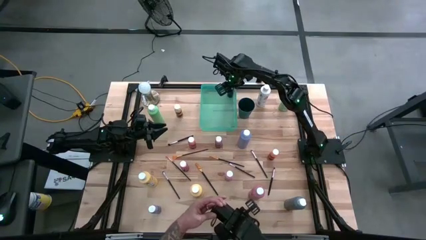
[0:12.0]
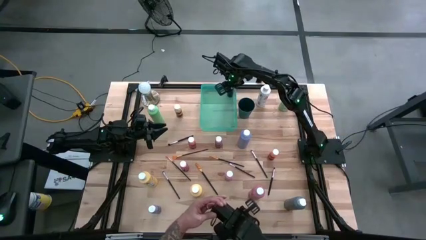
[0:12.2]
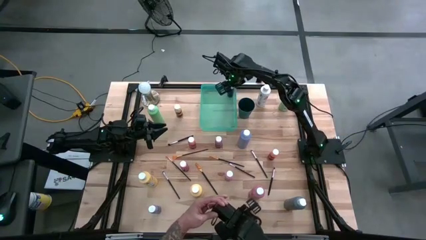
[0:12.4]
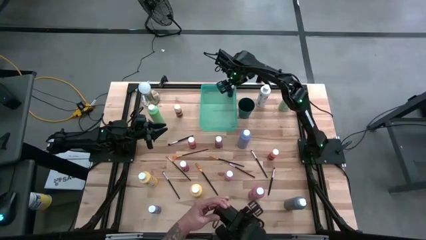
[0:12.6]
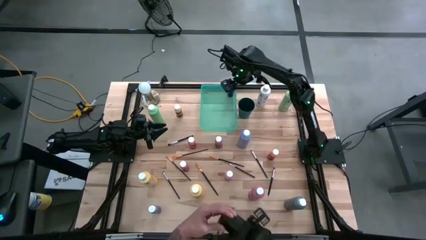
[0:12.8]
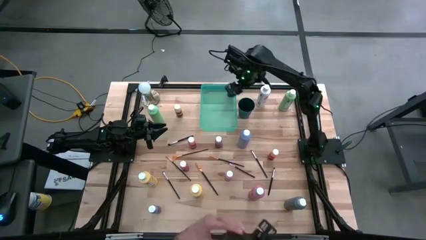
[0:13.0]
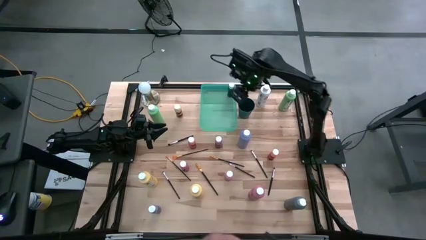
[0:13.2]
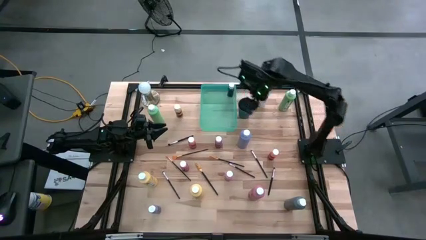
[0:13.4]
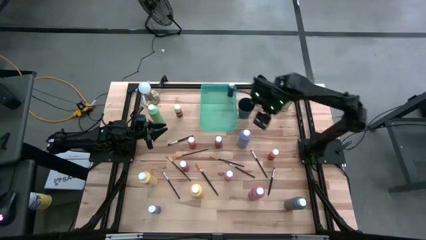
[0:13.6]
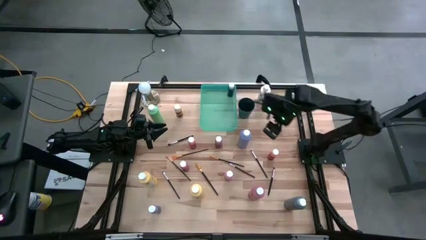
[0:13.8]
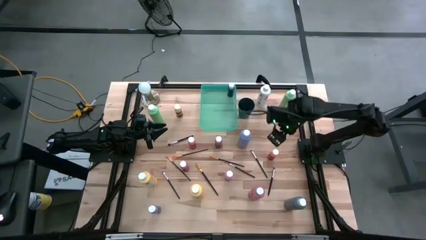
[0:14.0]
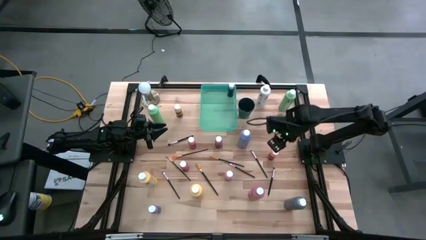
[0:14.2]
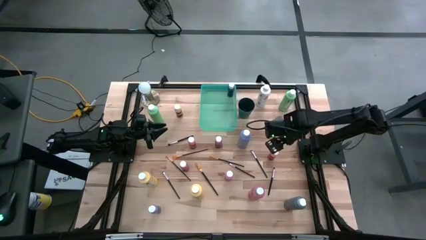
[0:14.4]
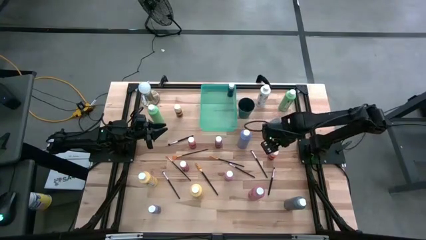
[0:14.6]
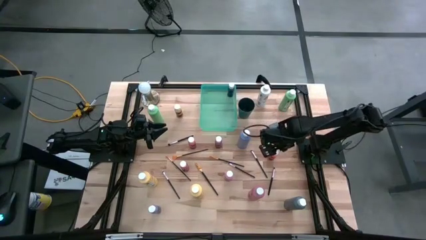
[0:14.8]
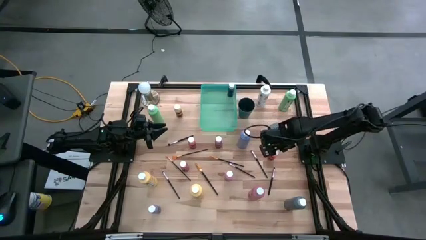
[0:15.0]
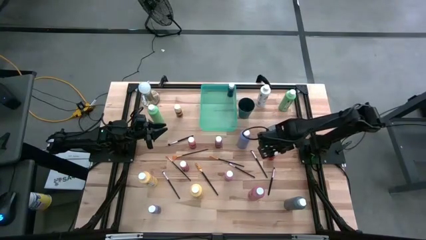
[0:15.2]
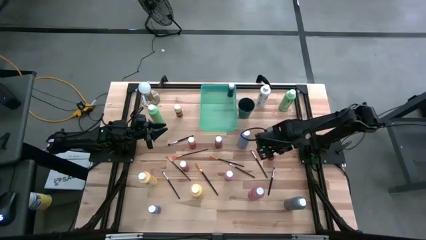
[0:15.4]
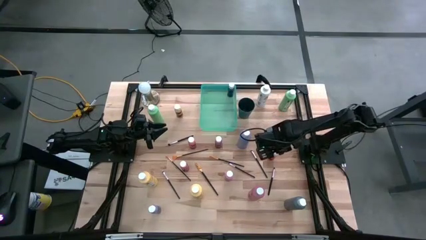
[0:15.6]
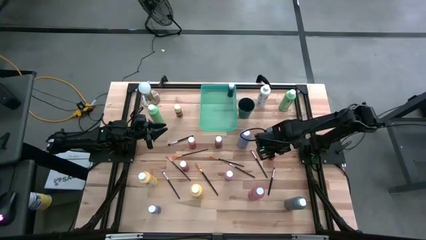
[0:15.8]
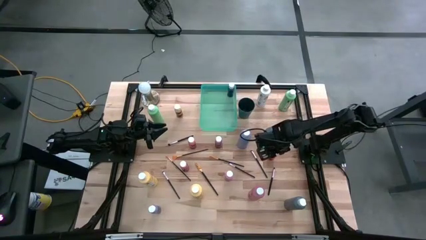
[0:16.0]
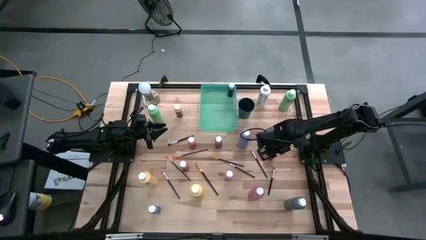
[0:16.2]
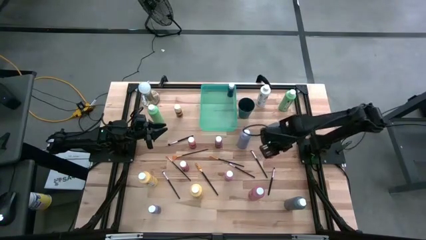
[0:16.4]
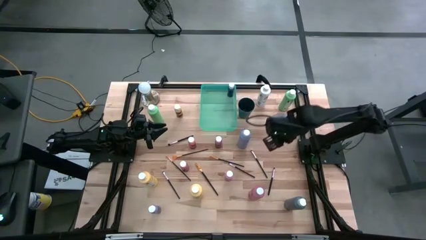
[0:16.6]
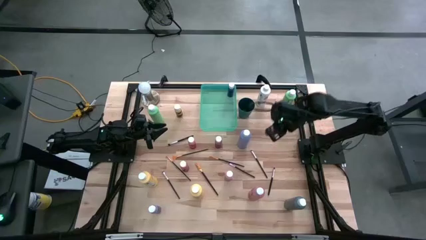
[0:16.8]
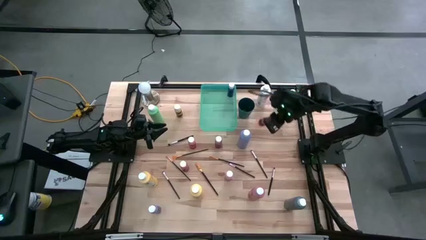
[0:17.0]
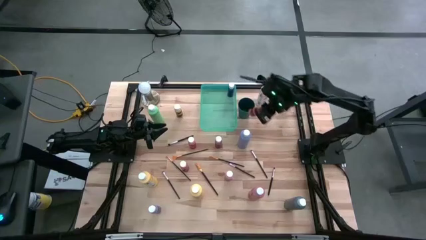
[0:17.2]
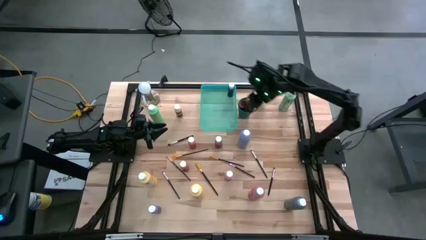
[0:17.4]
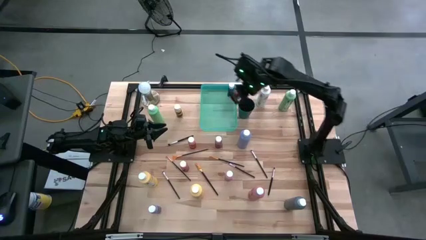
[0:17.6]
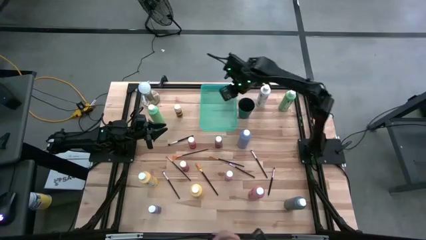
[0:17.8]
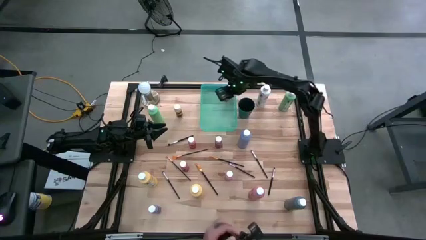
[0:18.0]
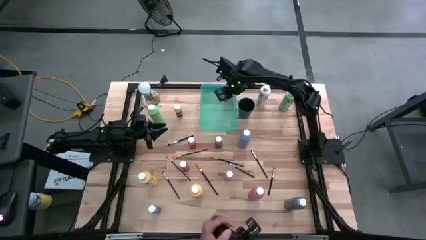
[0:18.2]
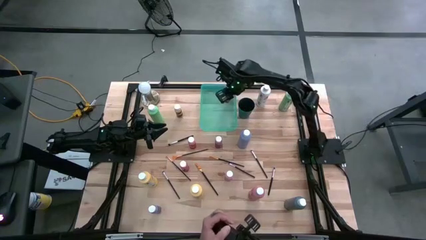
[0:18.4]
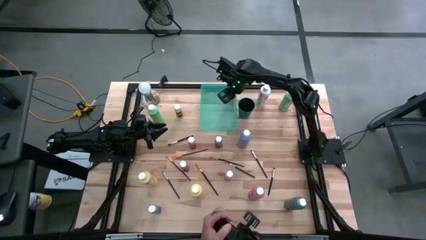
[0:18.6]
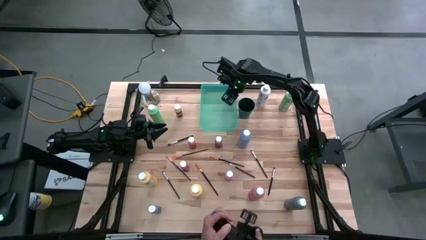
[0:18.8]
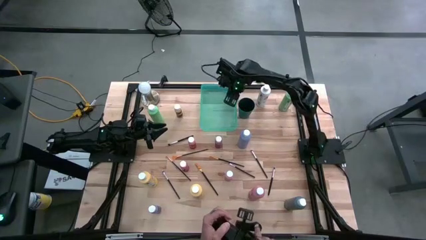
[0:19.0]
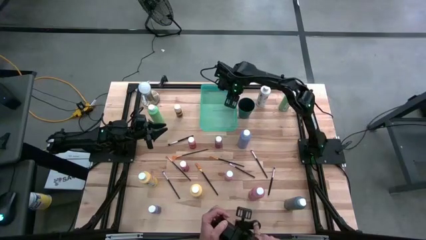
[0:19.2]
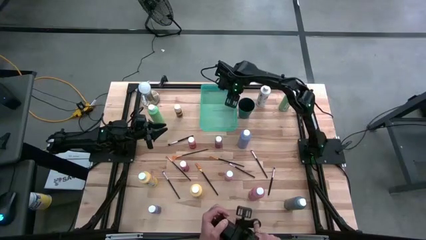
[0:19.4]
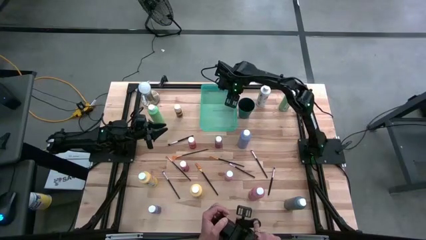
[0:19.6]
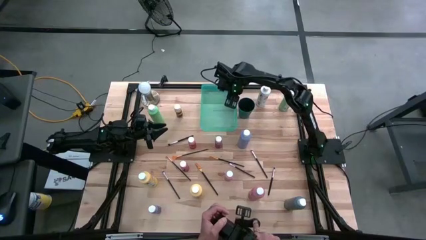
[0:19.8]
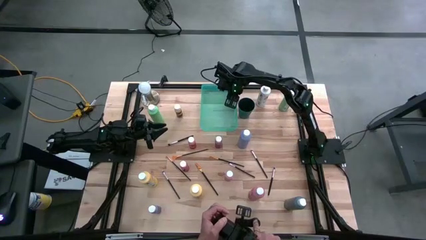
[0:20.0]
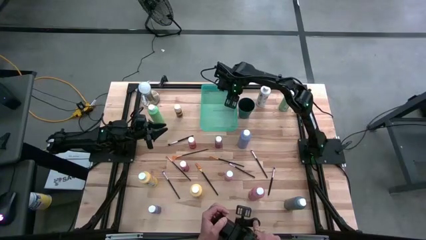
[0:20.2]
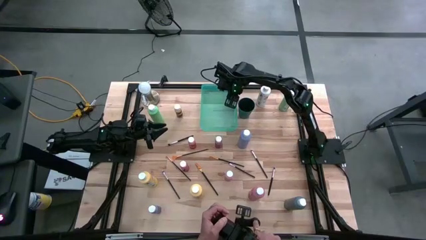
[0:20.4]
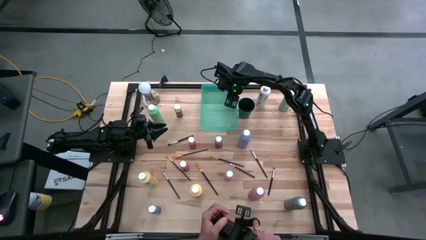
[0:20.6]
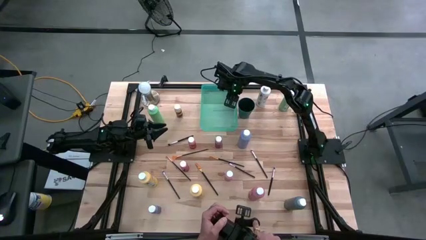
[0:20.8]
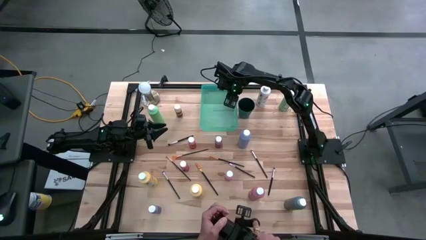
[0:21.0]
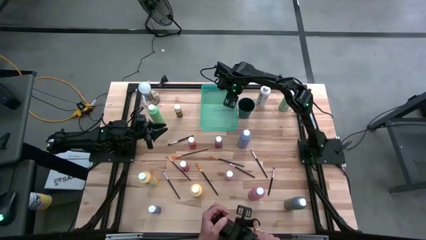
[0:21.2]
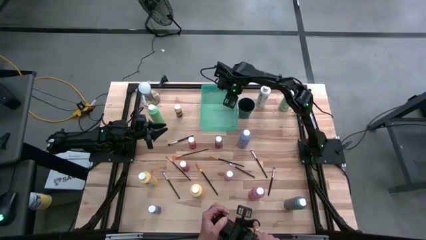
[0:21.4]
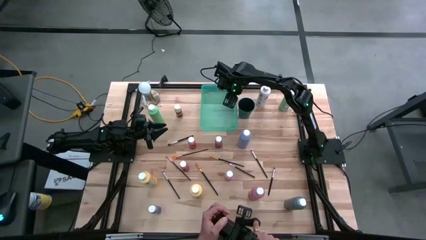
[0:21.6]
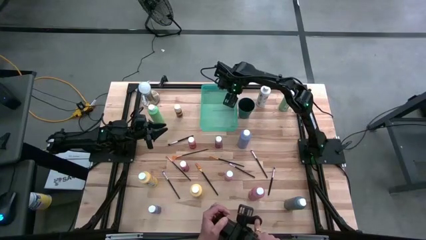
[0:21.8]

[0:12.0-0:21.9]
Task: Pick & Place Paint Supplies
Put the orange paint bottle into the green bin

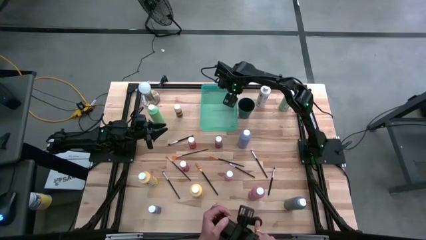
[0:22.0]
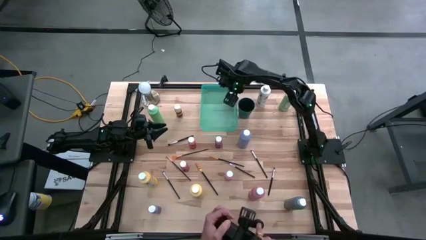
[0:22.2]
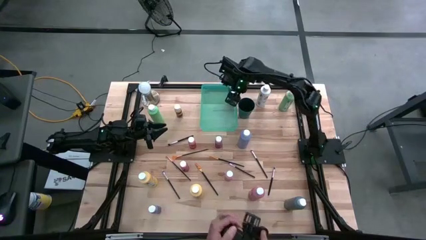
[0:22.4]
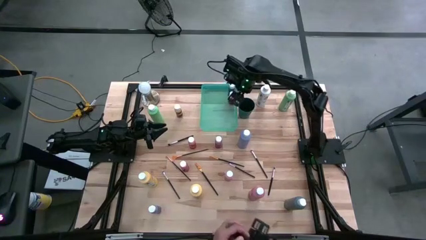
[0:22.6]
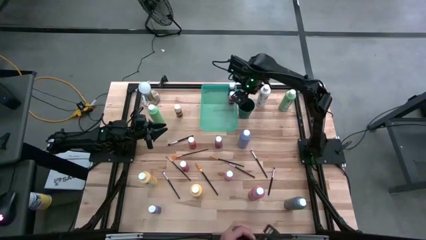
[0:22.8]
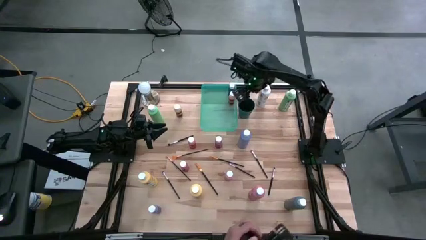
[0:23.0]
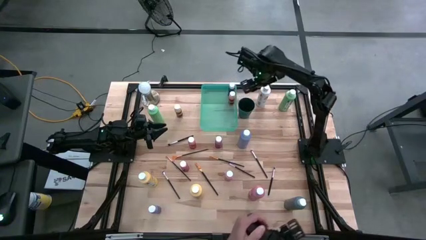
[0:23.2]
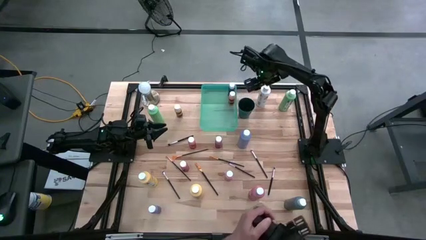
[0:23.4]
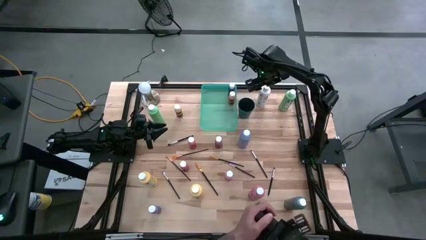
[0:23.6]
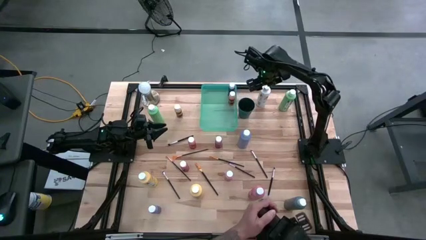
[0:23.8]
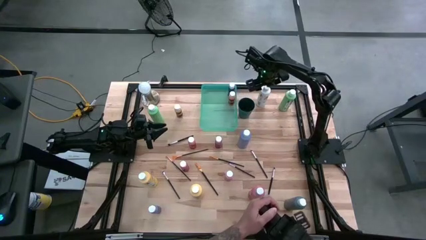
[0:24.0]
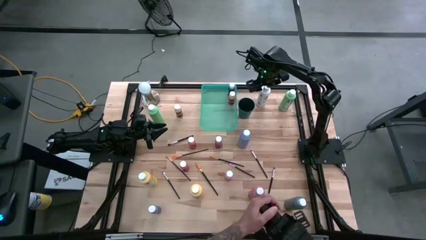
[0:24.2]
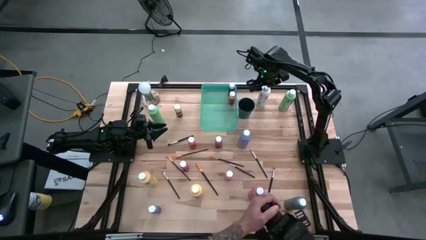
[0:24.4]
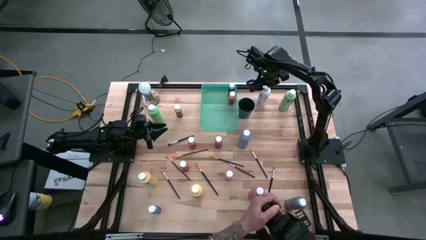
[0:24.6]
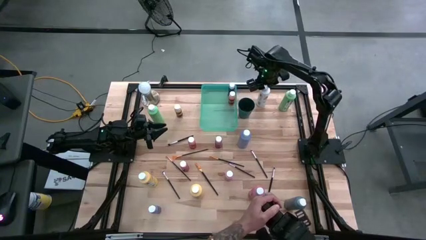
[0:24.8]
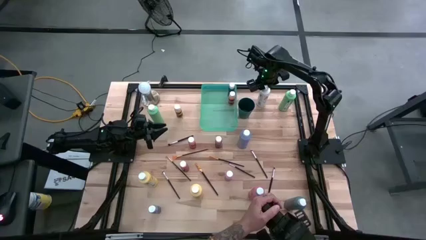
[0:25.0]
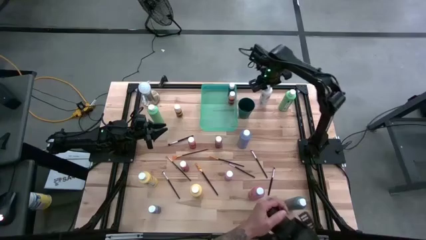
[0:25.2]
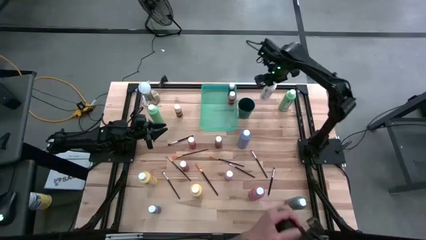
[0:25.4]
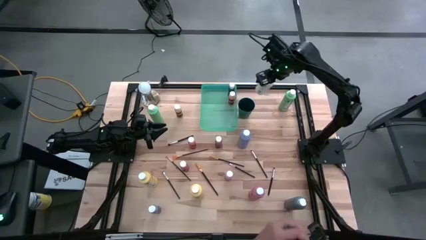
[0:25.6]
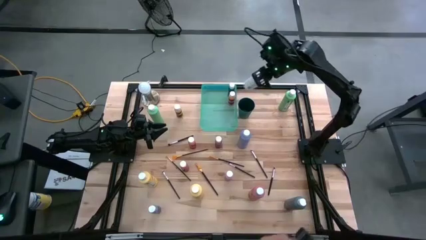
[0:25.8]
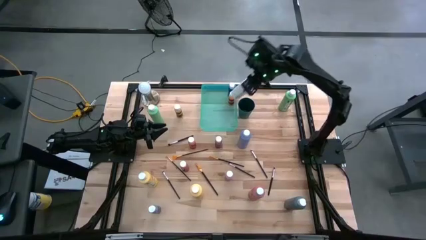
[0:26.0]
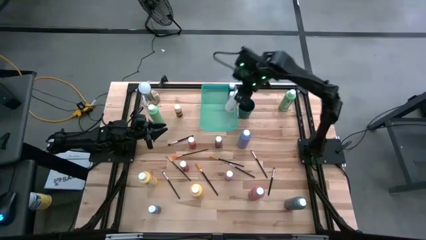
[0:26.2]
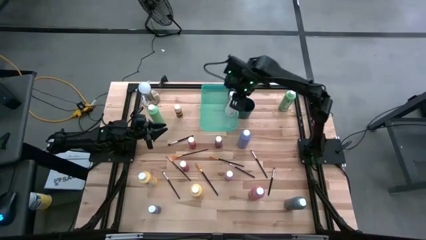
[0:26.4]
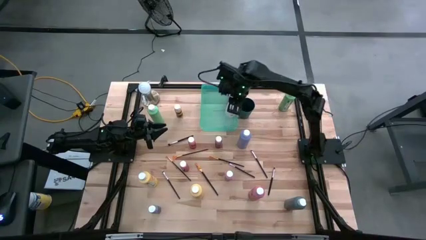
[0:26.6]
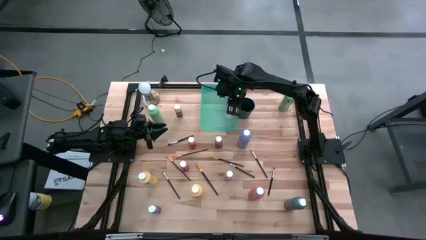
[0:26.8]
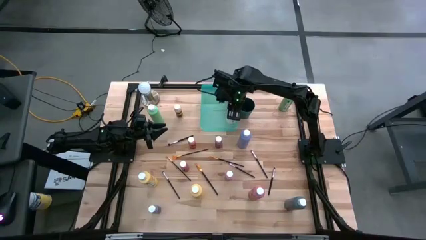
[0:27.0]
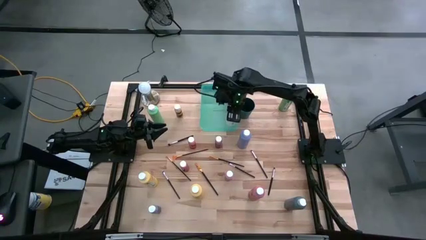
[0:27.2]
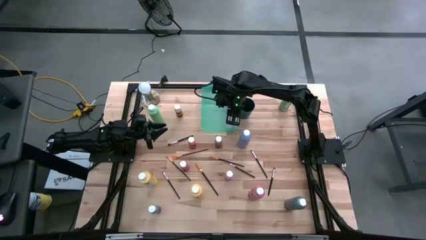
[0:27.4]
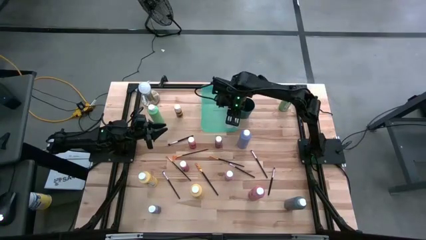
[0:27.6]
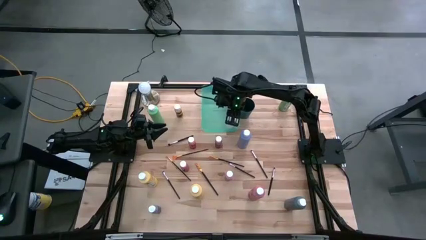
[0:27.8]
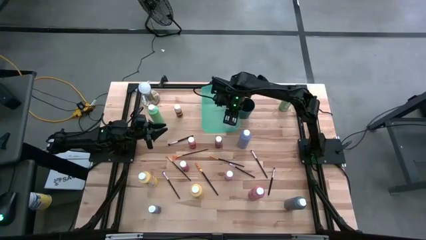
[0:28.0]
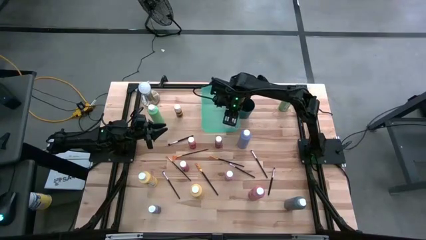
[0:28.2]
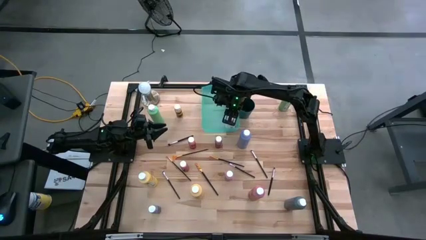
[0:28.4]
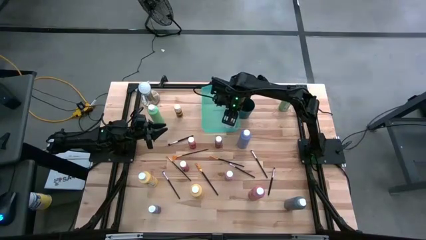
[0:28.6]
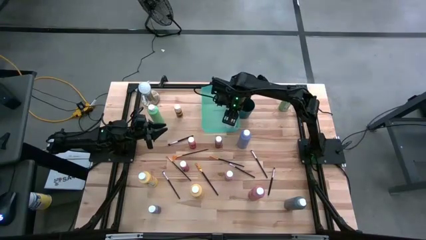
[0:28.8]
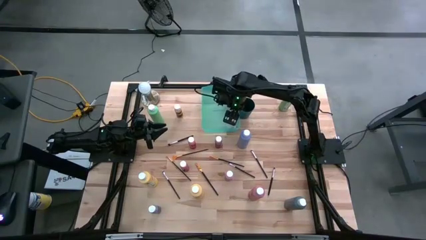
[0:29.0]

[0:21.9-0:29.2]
Put the white paint bottle into the green bin
